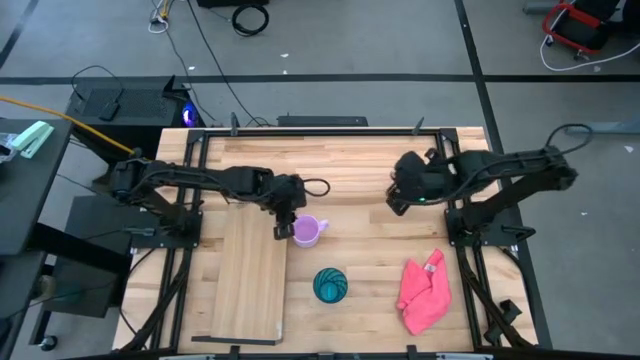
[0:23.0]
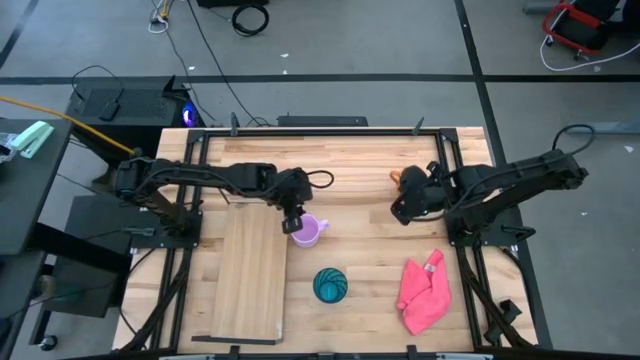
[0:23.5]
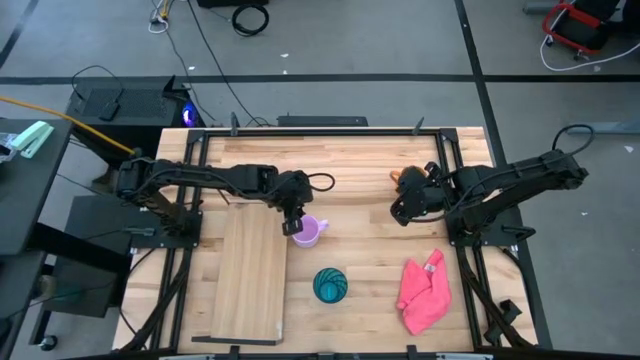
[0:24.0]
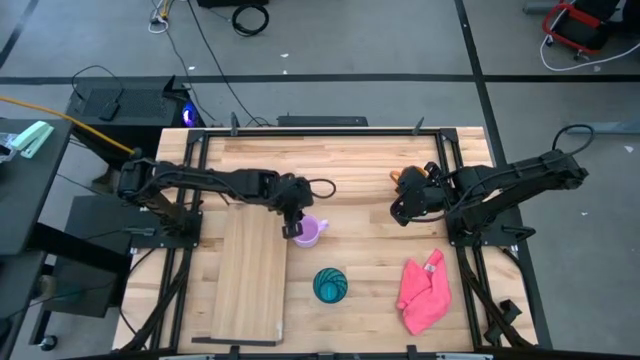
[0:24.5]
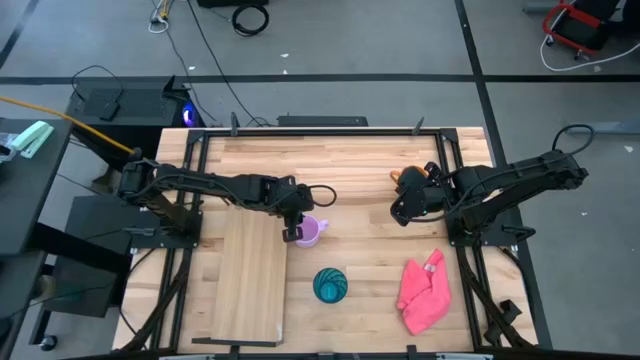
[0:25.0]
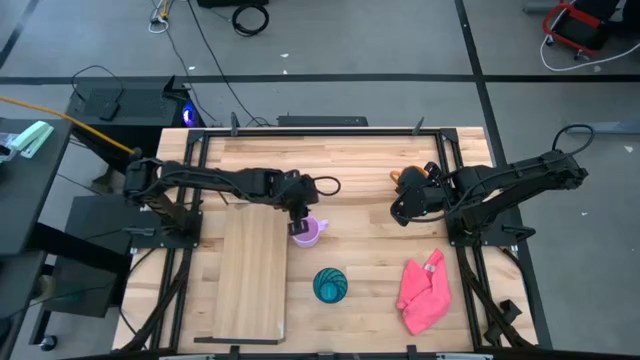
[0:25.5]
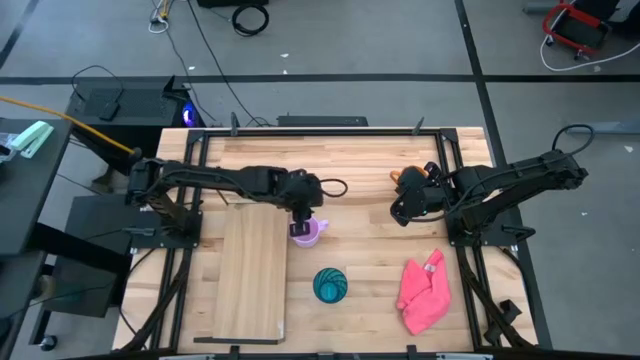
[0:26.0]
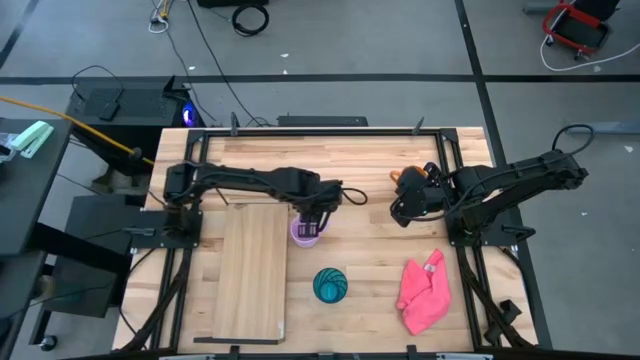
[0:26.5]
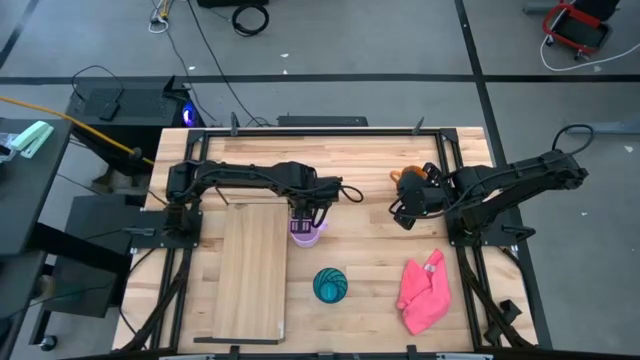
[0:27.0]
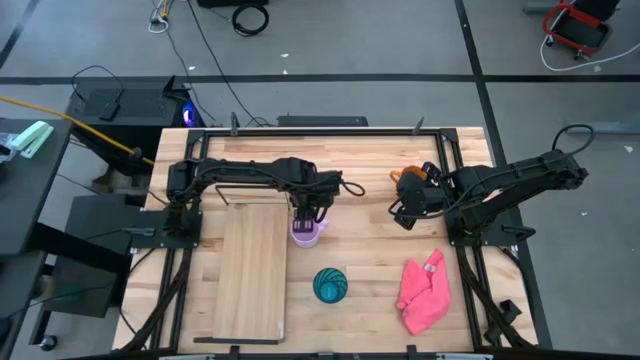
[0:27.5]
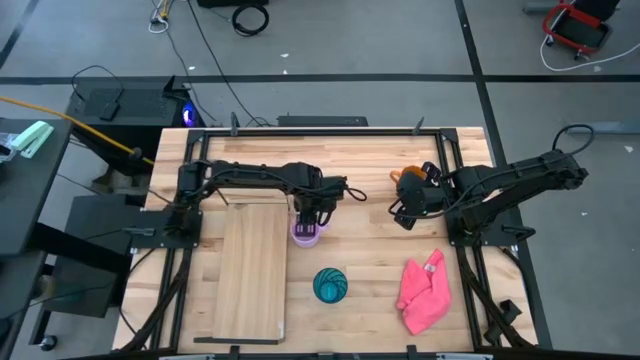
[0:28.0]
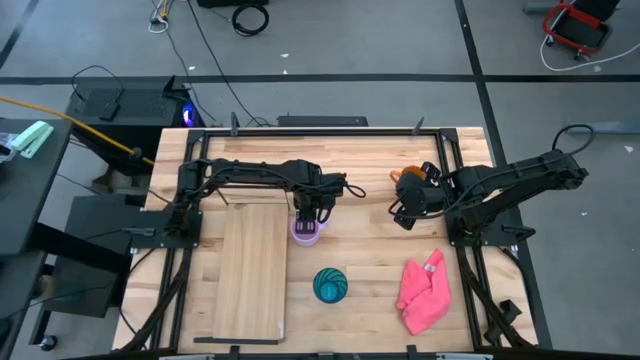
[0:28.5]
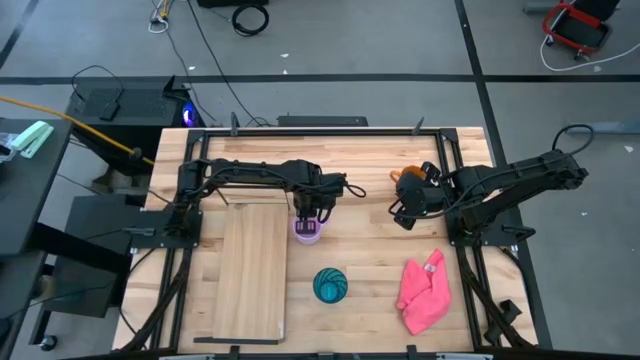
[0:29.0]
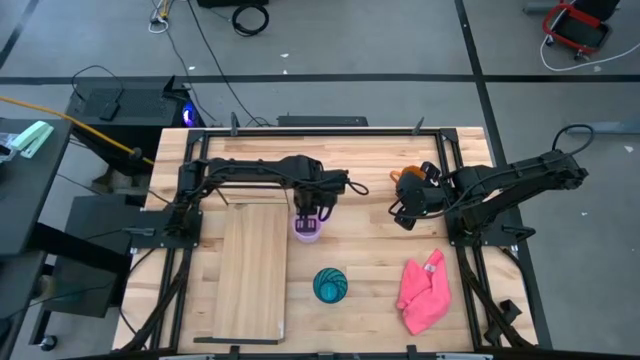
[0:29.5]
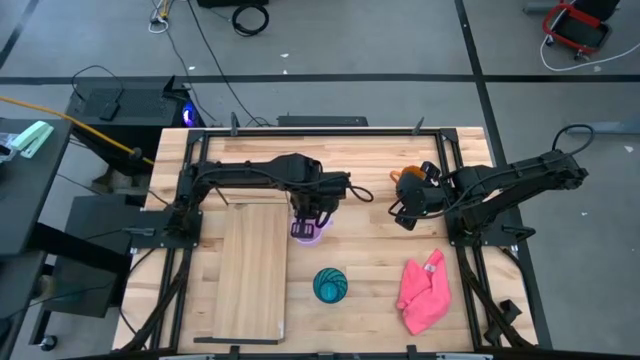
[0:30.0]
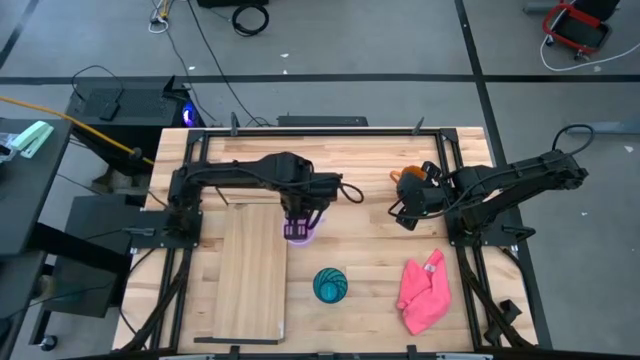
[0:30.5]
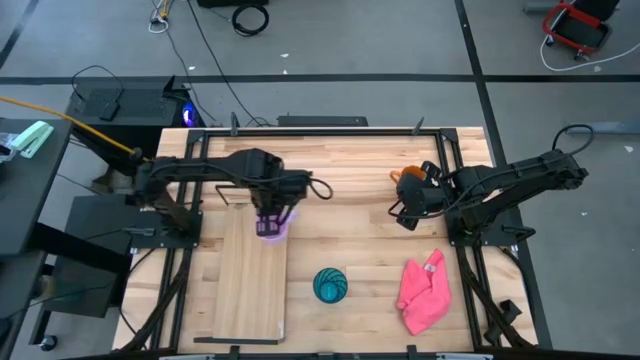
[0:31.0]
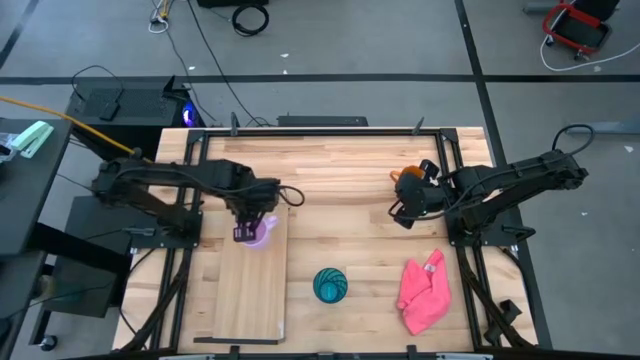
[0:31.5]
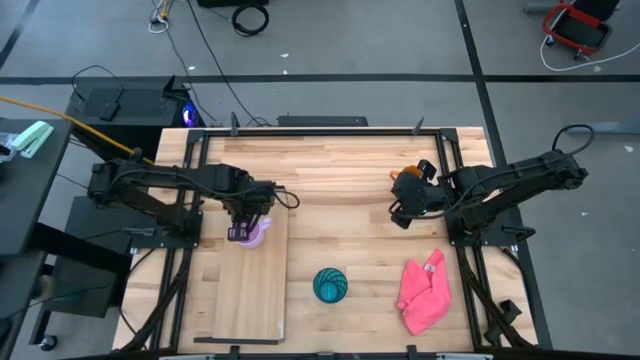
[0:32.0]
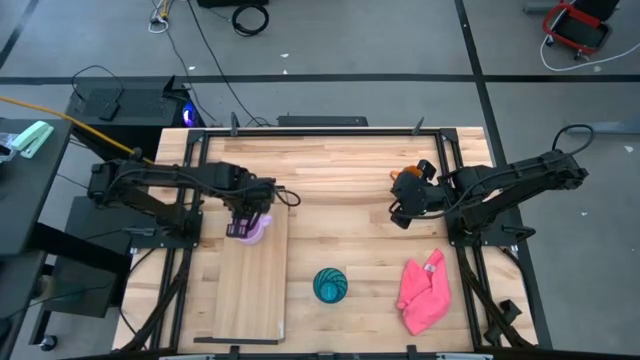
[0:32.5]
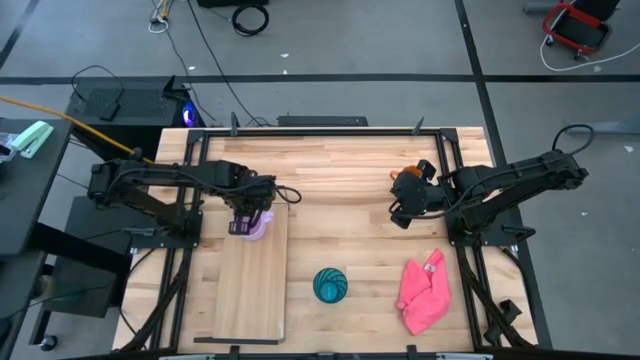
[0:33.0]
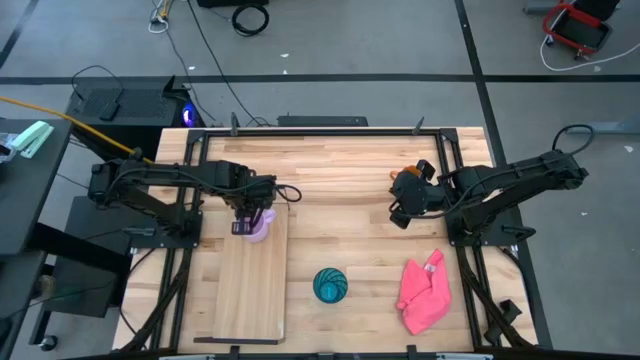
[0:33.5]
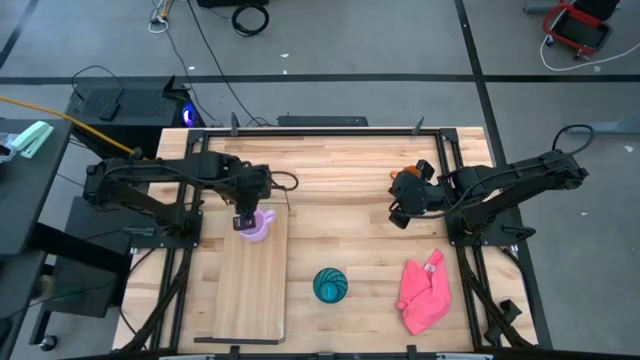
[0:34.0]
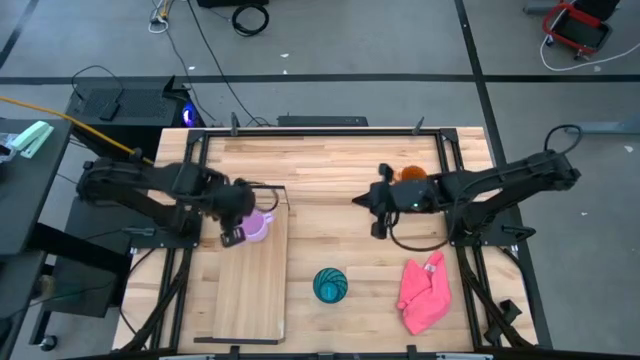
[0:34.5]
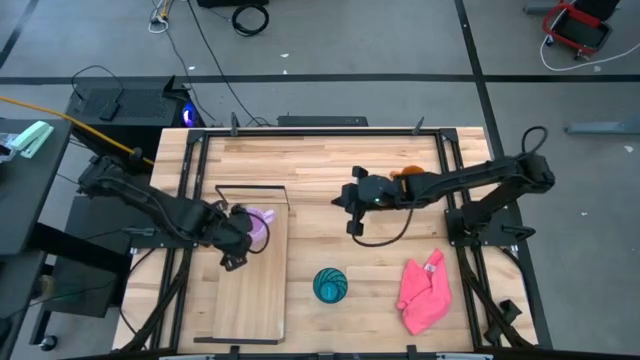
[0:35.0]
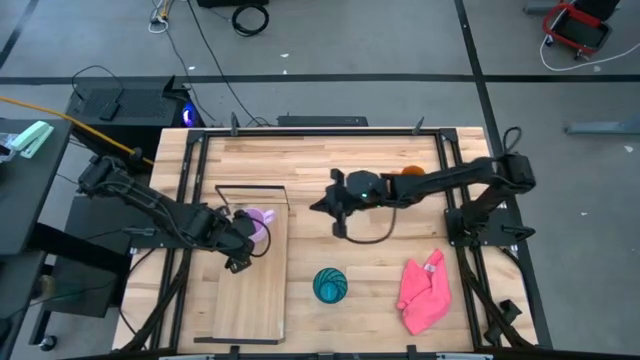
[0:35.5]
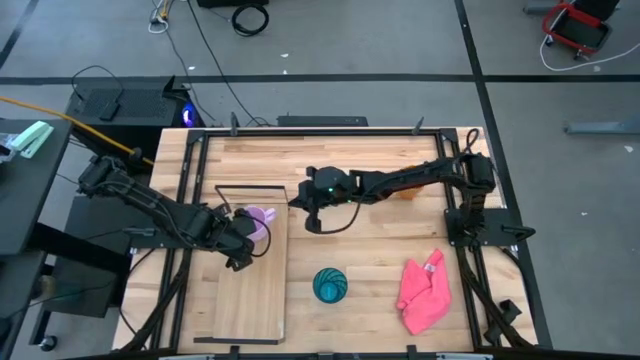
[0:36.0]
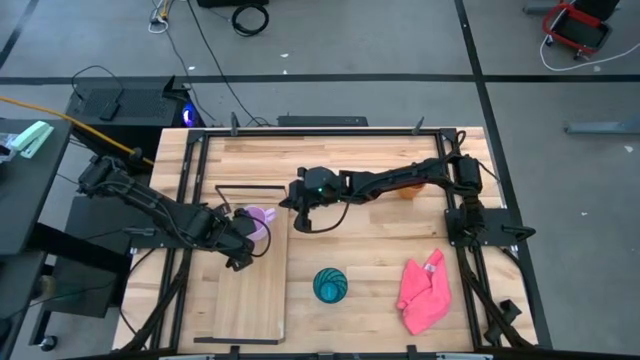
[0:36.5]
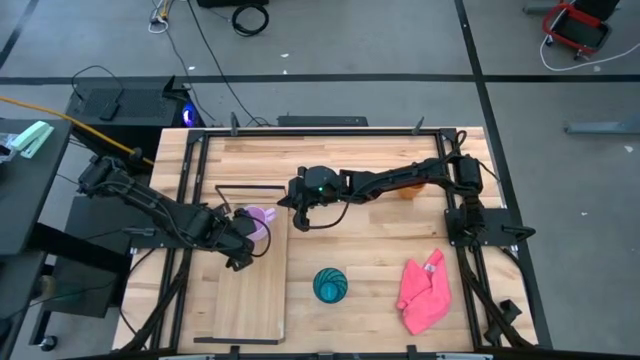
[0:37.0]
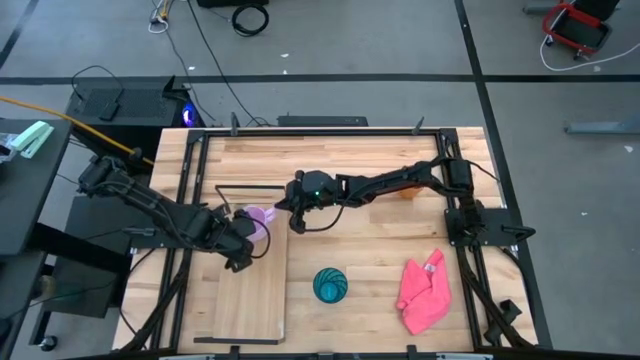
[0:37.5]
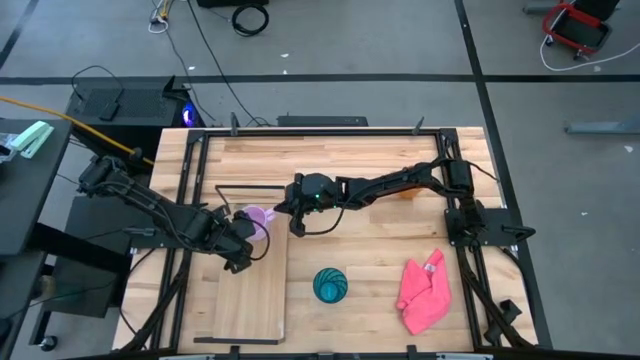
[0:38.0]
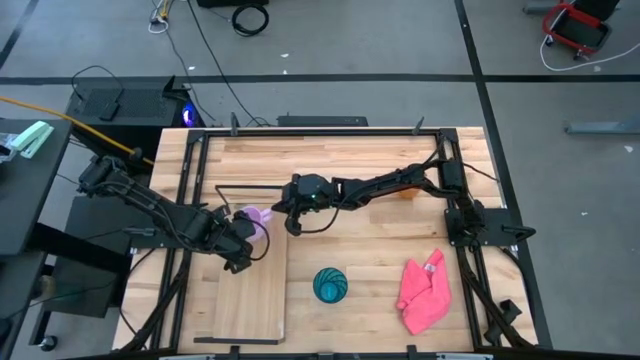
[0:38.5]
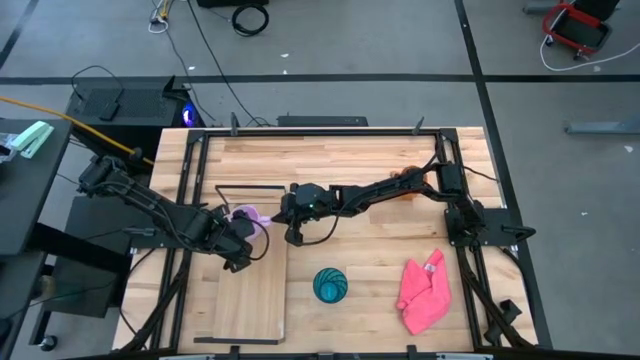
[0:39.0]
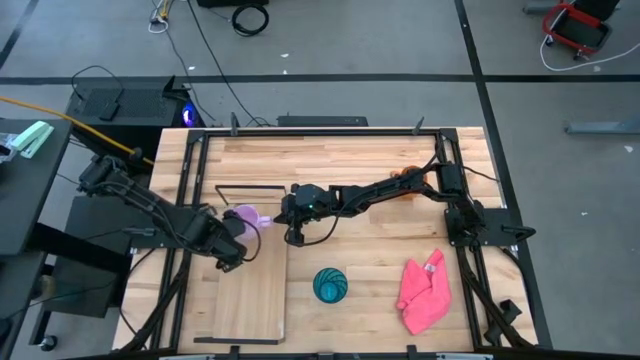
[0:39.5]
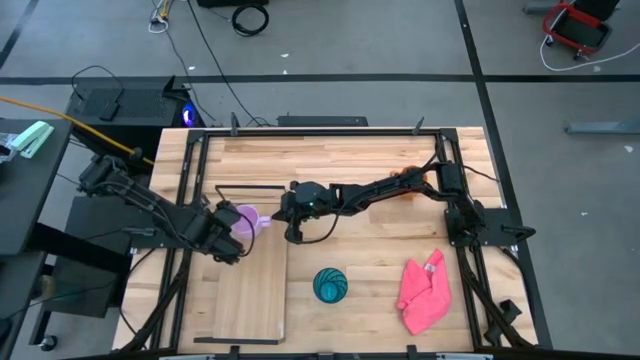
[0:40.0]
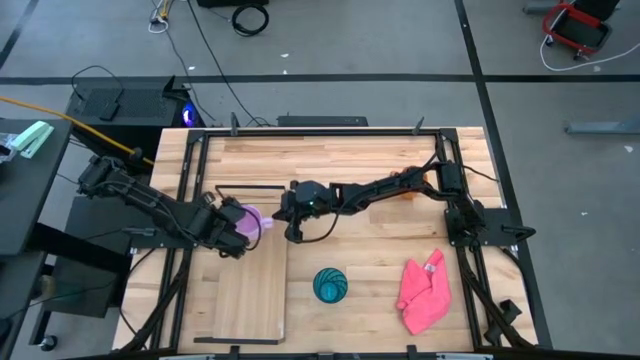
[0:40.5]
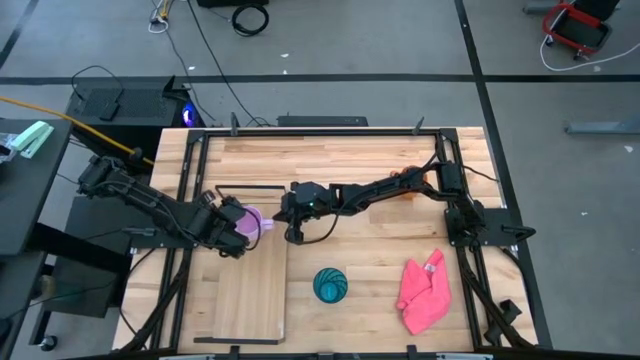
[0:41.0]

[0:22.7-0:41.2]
Task: Stack small to large cups/mugs on shelf
Put the purple mug on the shelf
